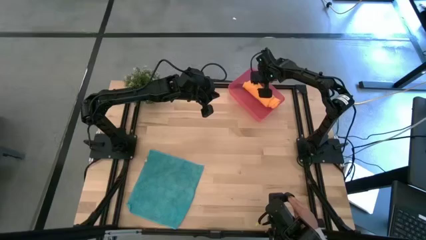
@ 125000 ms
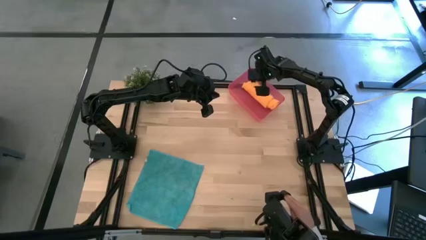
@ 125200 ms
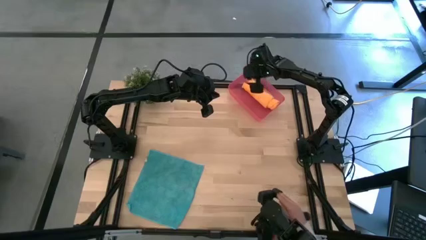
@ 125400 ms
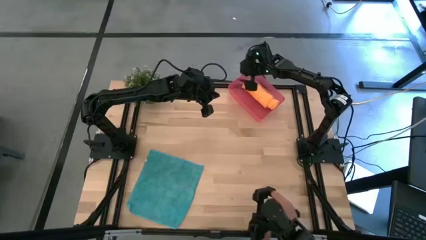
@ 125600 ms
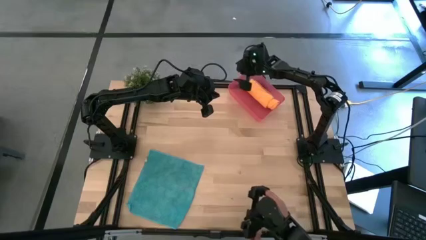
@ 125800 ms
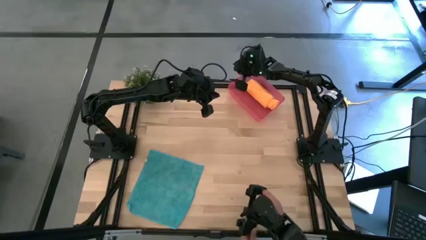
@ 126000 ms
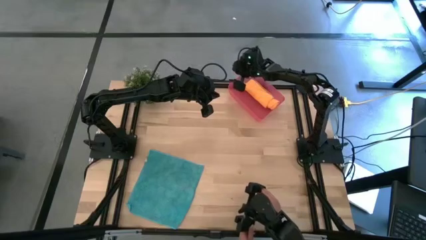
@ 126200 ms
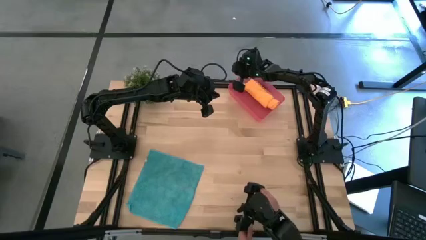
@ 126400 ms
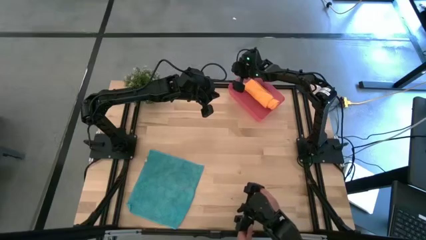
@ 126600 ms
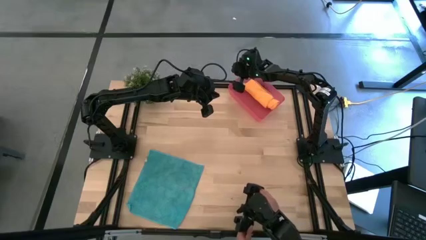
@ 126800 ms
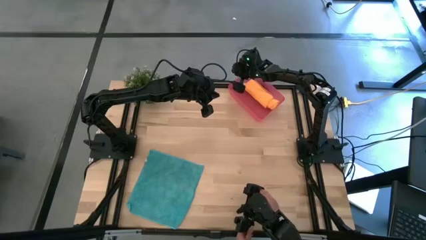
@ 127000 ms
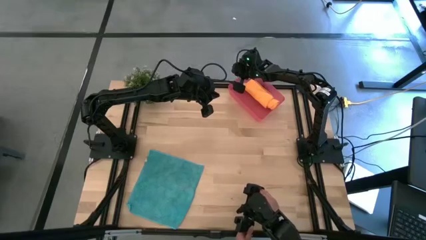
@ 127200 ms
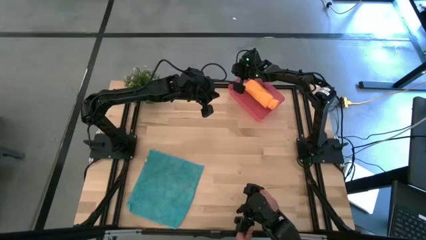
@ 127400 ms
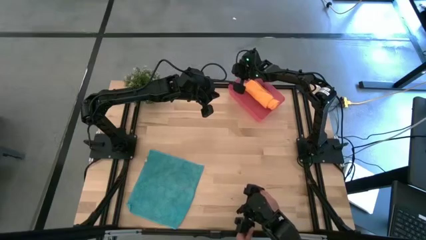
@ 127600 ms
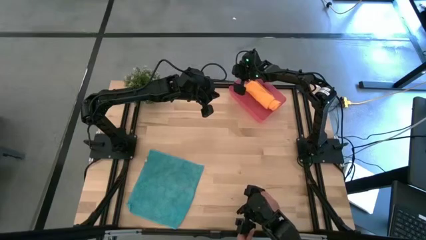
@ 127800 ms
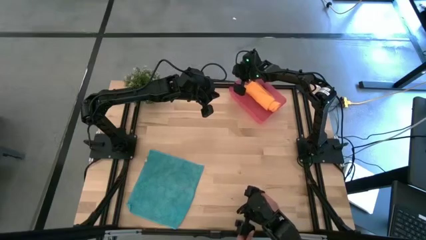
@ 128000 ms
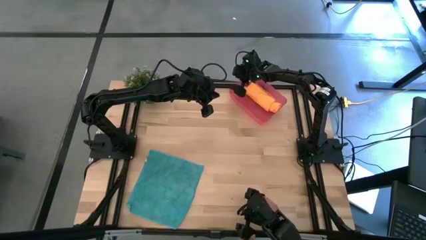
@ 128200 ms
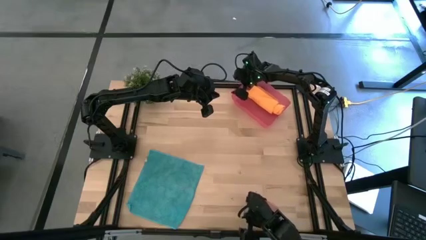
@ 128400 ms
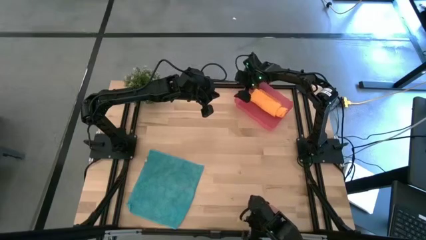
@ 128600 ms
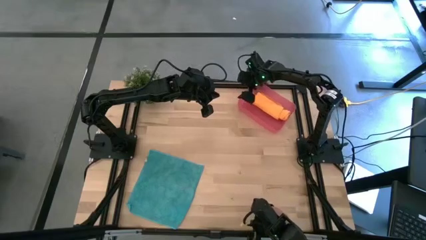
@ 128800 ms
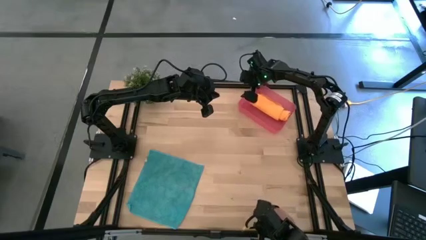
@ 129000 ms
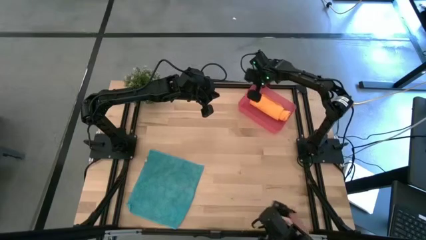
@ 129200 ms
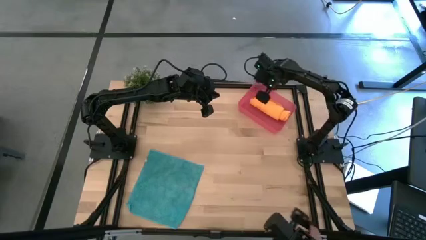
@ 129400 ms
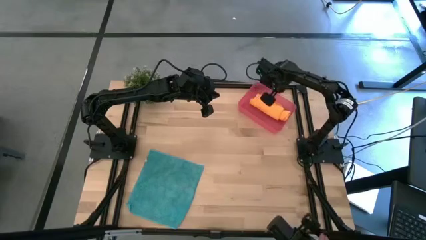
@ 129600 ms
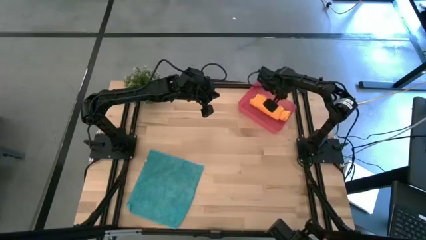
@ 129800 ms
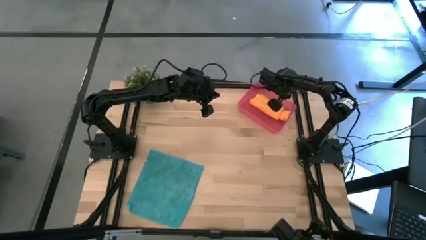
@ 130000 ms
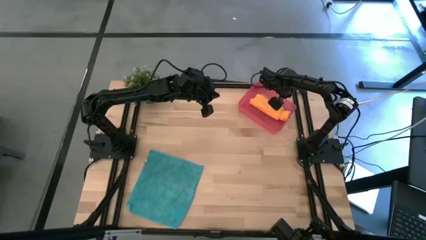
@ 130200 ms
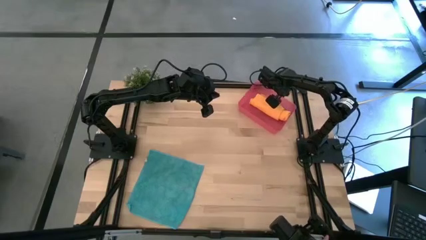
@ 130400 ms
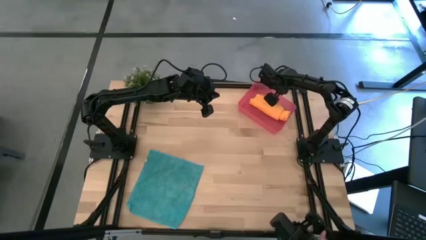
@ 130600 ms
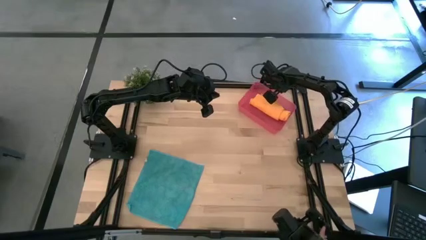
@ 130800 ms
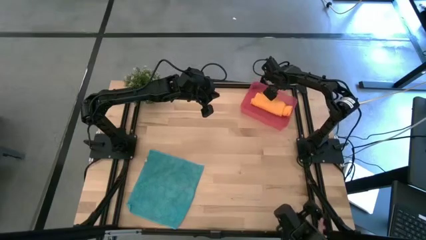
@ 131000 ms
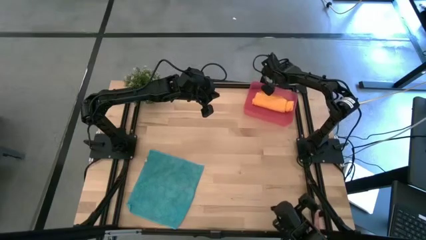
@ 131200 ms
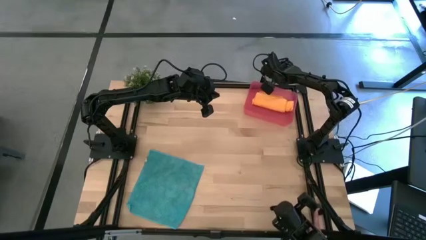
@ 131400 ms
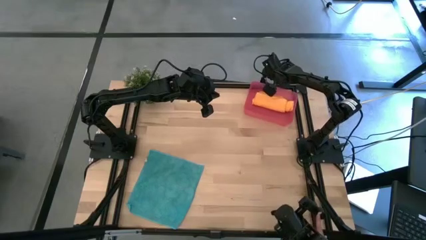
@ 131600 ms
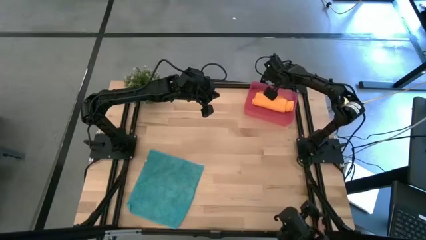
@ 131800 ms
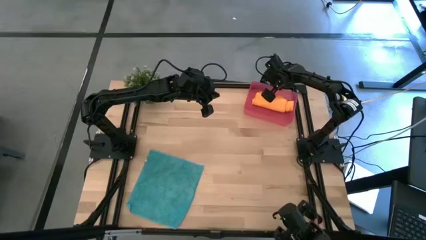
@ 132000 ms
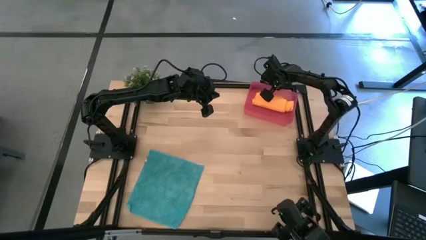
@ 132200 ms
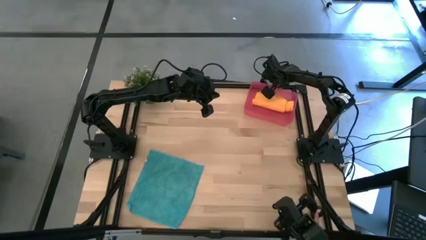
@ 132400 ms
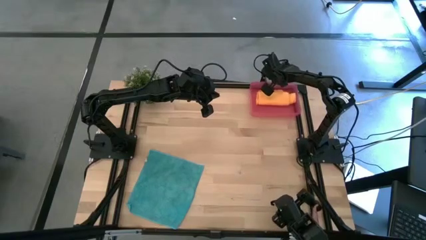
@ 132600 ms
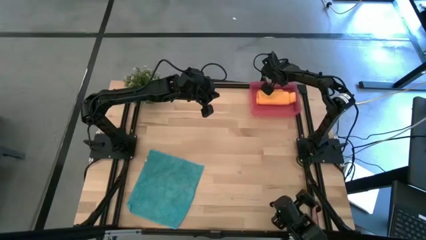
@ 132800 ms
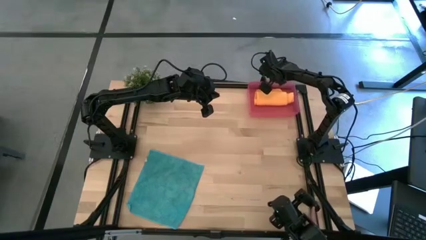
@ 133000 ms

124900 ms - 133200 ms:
Task: Roll microfiber towels into tight, uniform cylinder then place into a basket
Adjust the bin

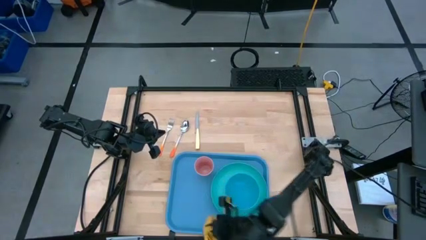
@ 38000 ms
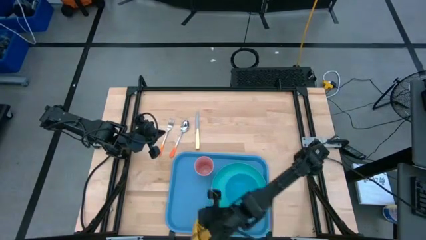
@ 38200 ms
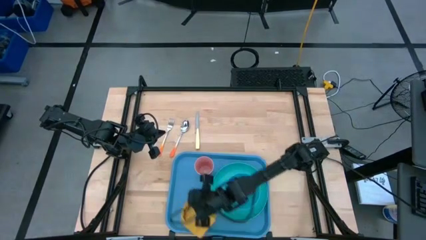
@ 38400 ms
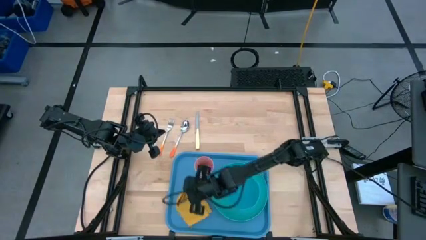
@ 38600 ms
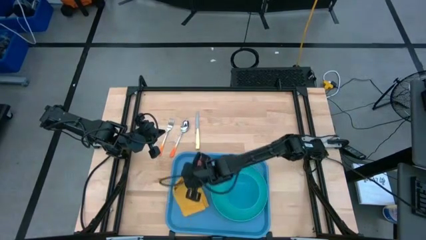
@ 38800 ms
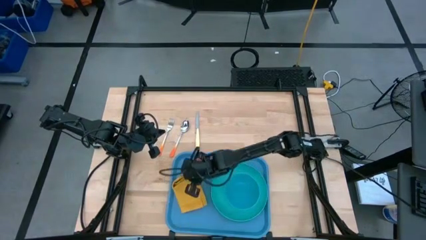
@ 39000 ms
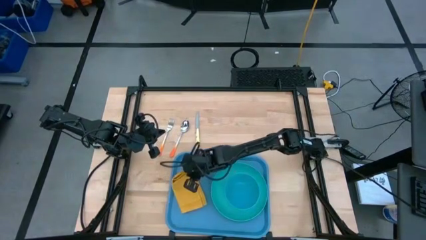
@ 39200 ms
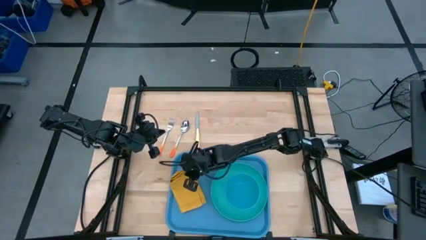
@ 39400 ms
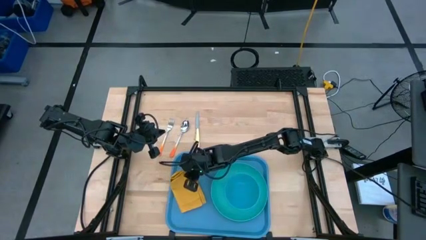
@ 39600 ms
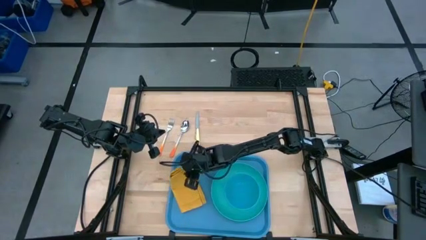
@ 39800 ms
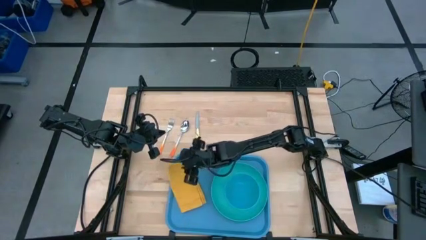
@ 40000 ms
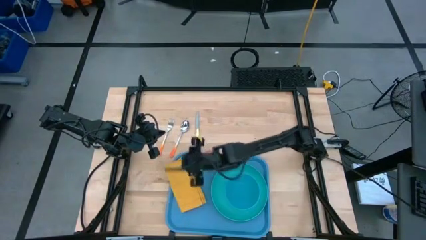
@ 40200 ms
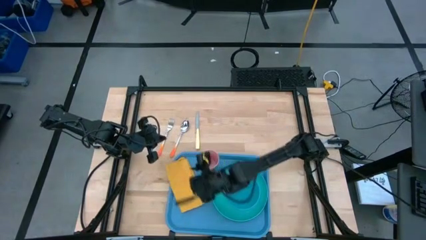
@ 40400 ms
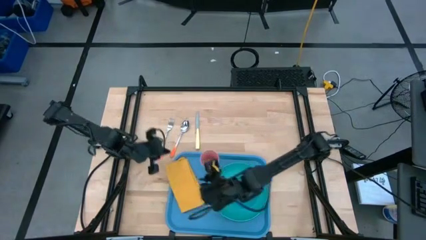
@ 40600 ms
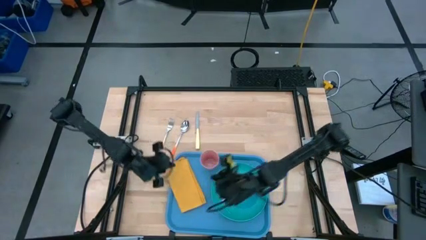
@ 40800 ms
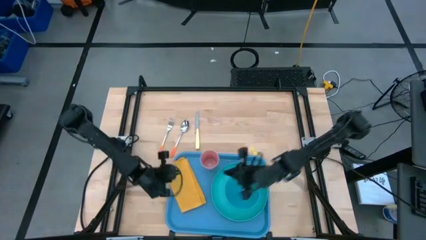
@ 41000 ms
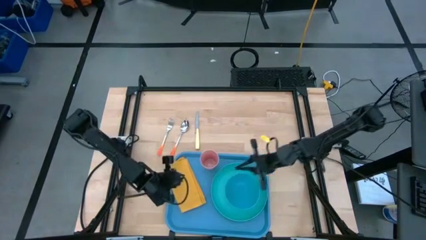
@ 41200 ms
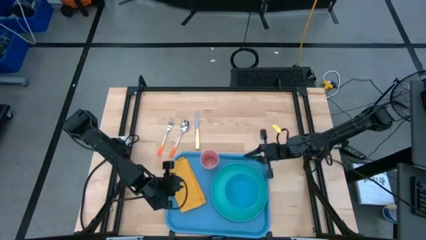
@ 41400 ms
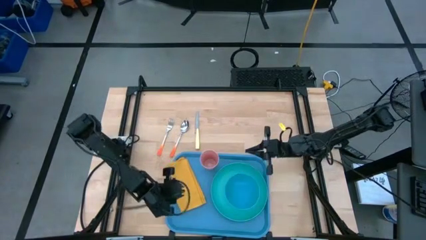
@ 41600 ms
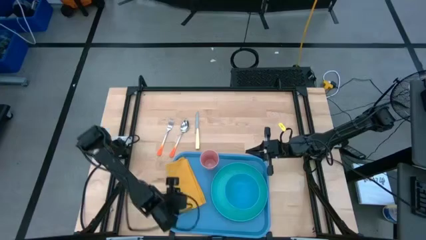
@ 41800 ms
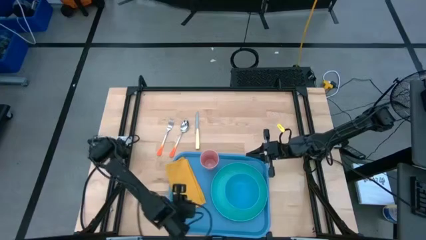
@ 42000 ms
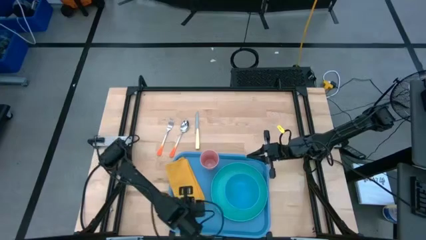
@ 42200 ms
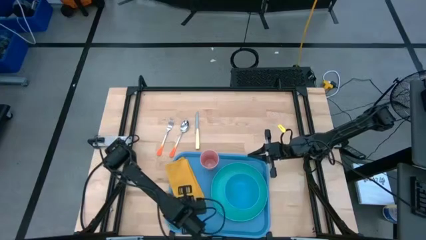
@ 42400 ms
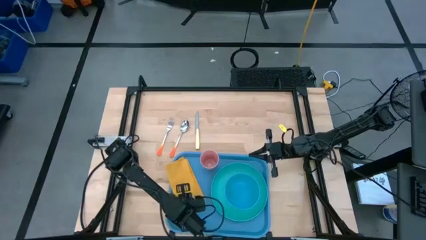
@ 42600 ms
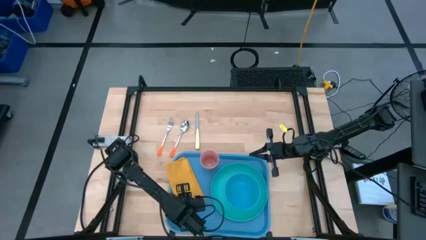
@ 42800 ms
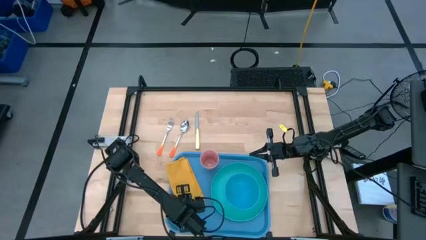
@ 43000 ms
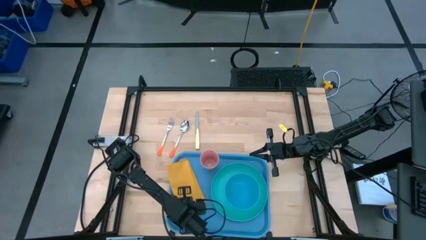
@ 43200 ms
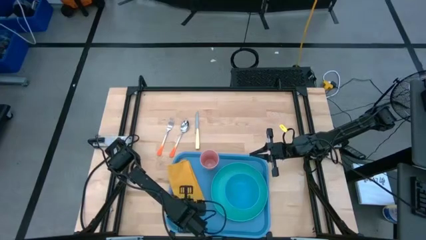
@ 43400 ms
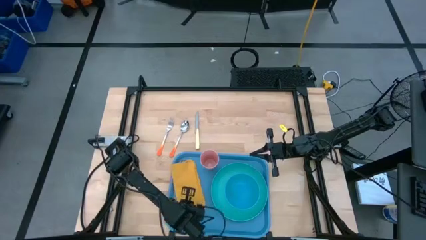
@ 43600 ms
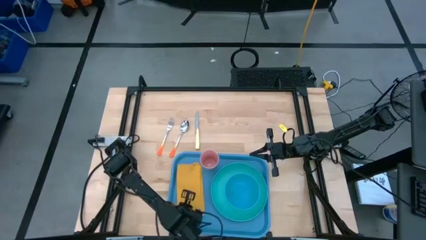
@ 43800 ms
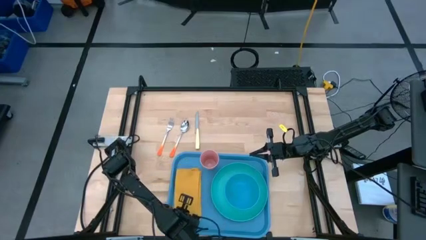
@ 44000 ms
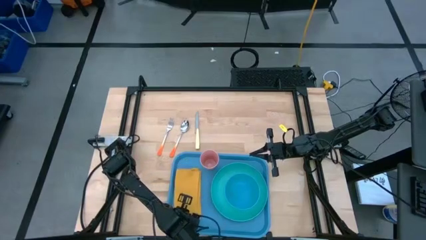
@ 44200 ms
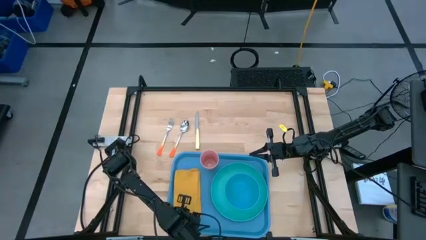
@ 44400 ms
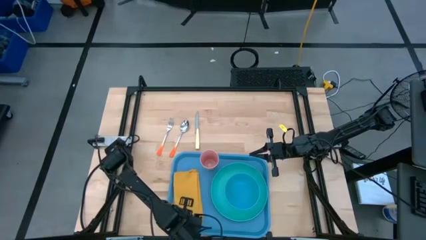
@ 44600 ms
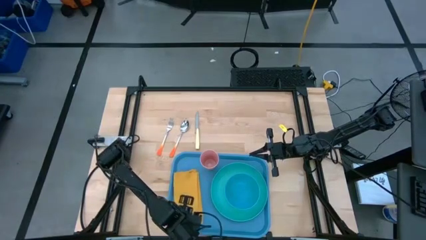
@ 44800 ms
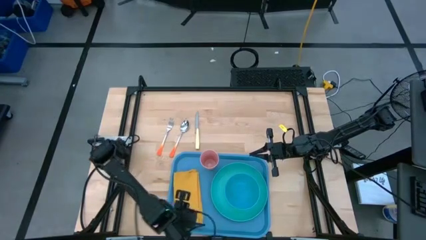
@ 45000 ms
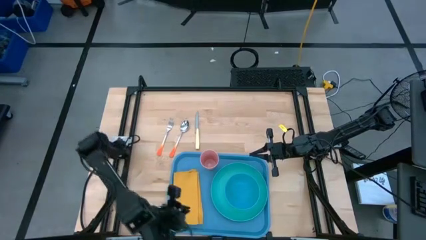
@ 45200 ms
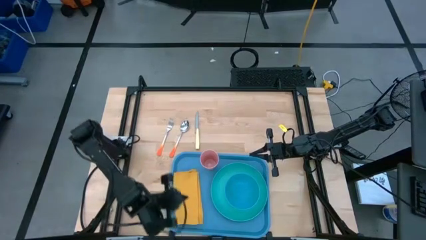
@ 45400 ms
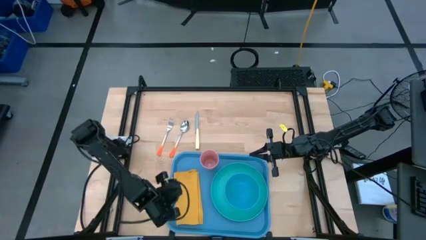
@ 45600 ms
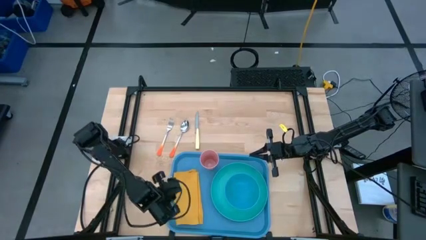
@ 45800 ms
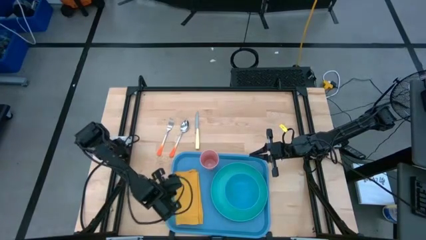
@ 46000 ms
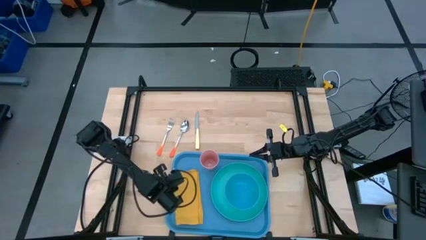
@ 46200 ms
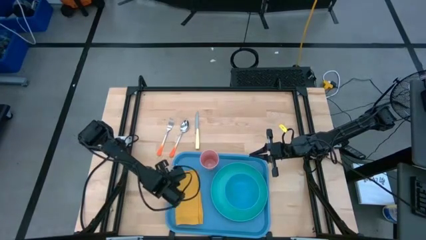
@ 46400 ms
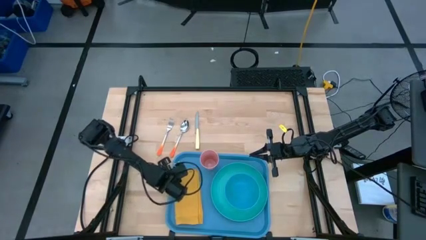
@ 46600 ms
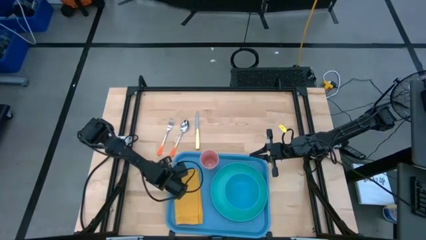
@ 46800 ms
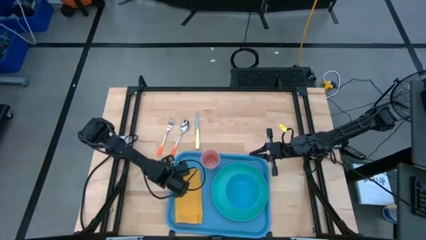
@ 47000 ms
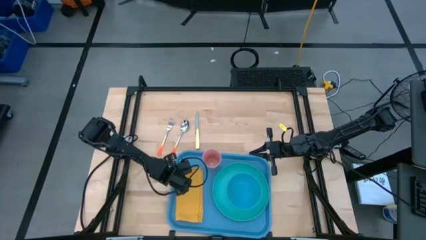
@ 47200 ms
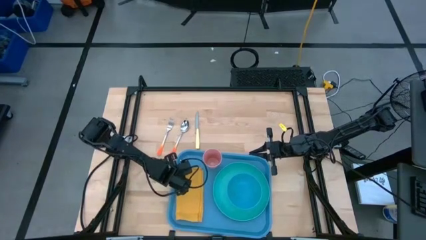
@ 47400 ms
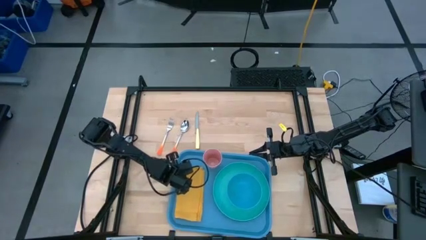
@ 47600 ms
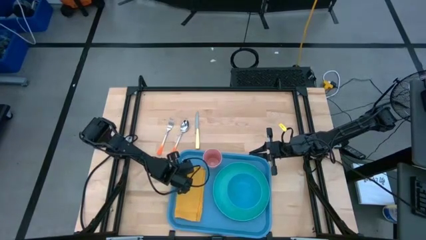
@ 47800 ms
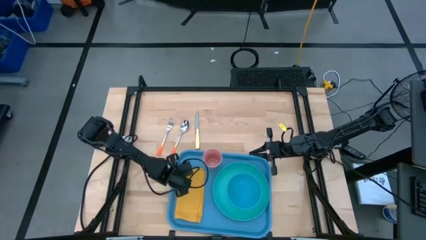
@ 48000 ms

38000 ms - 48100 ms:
Task: Set up tray
Put the yellow napkin to the left of the green plate on the blue serving tray
